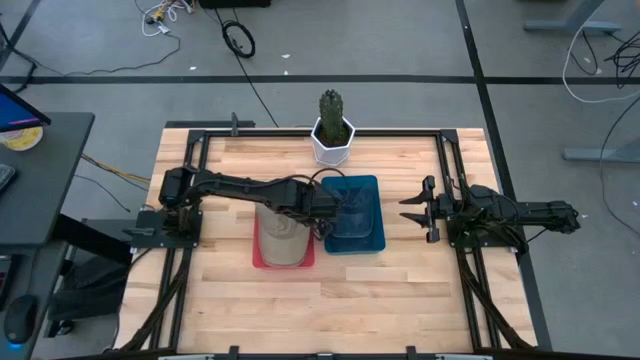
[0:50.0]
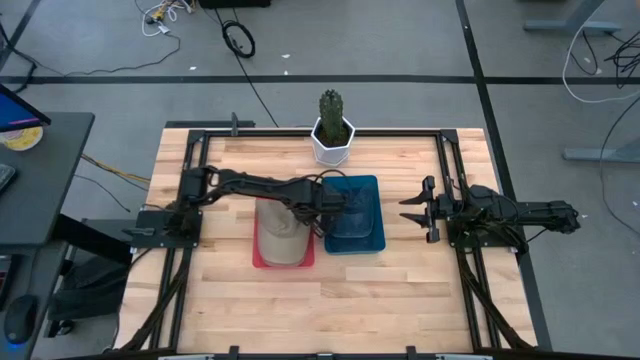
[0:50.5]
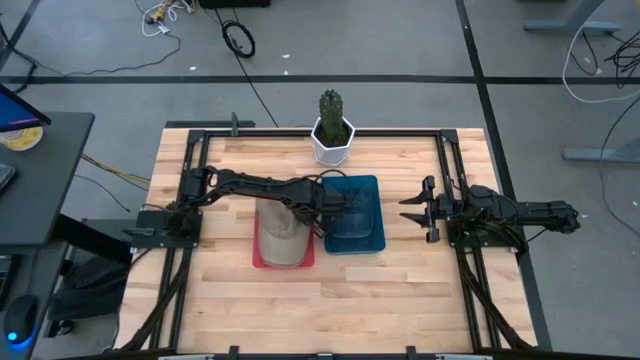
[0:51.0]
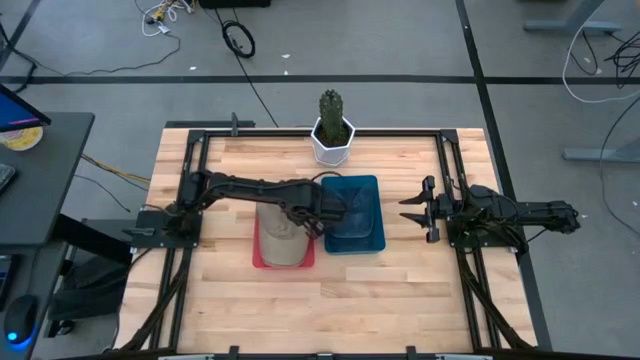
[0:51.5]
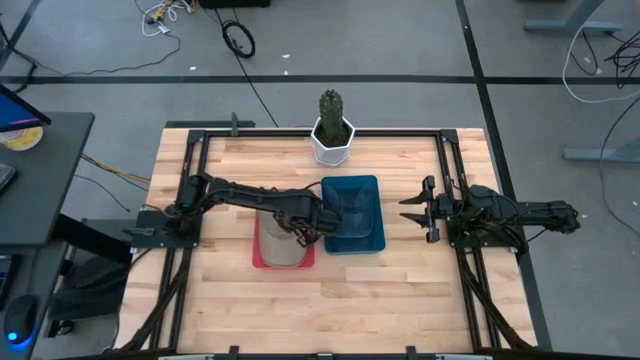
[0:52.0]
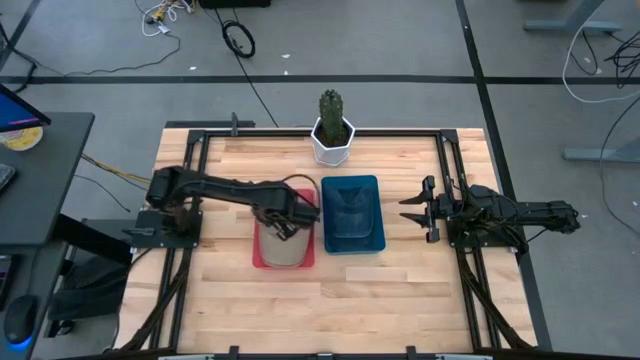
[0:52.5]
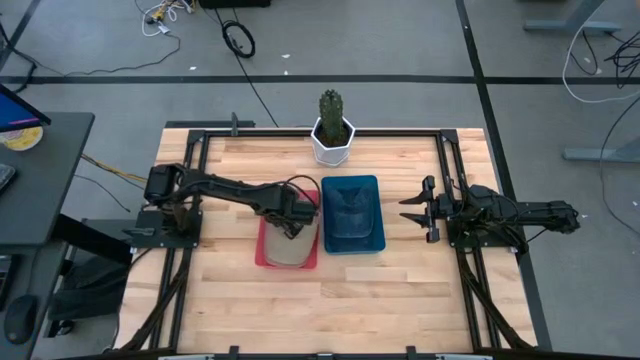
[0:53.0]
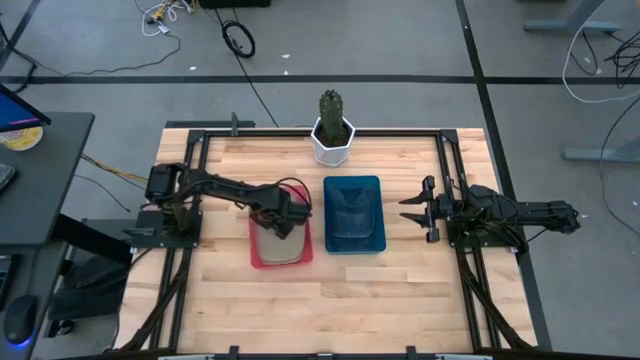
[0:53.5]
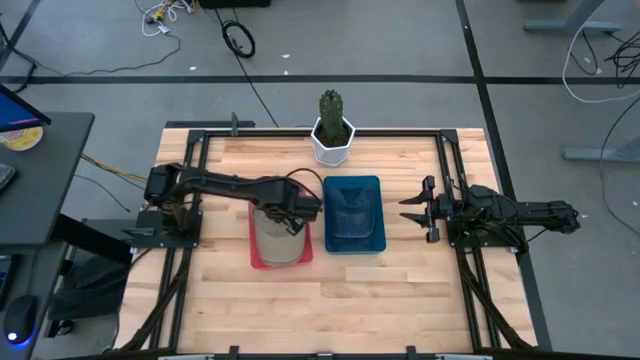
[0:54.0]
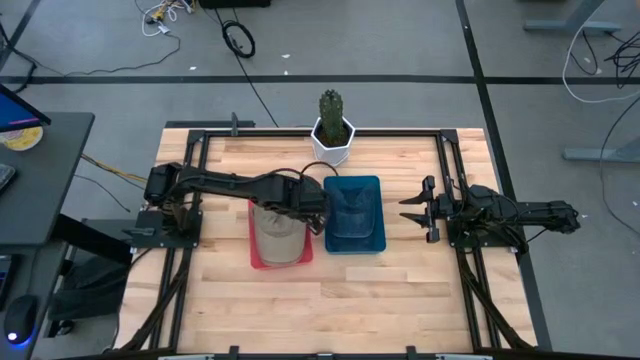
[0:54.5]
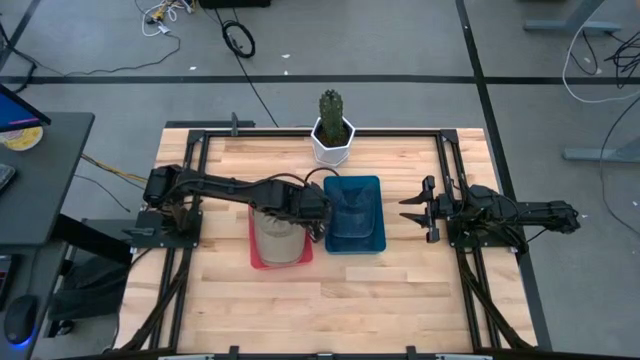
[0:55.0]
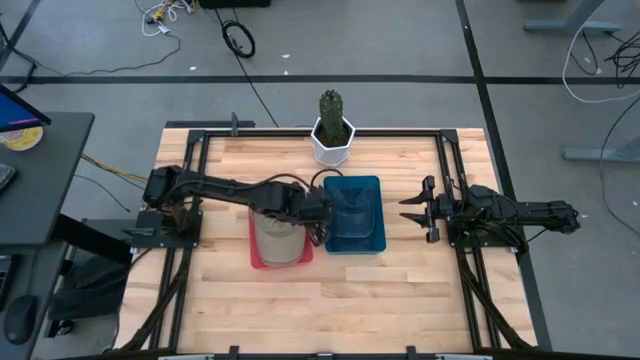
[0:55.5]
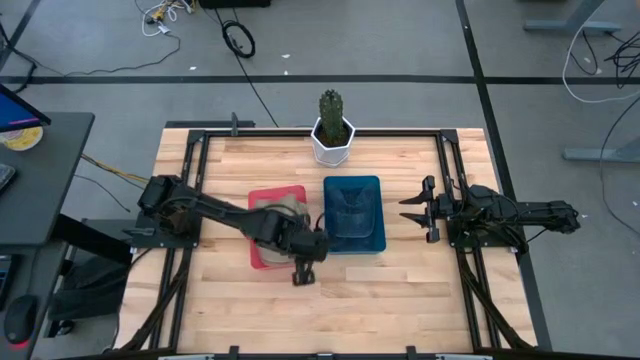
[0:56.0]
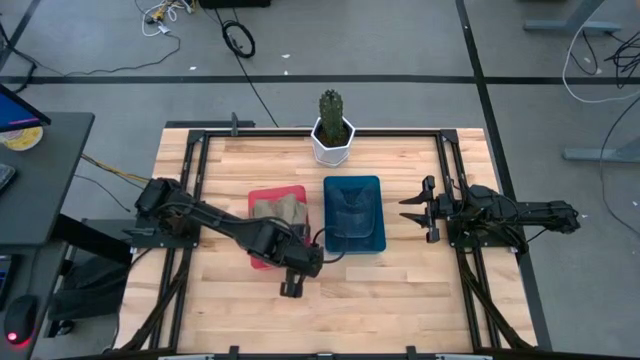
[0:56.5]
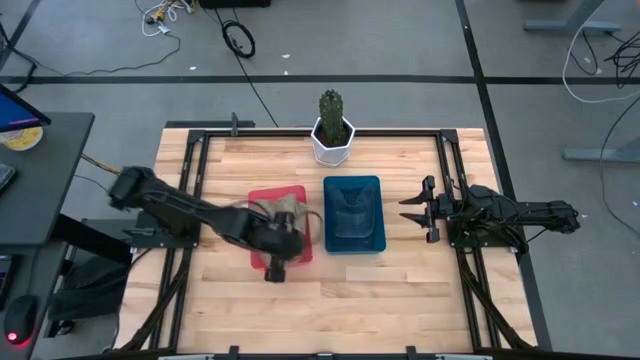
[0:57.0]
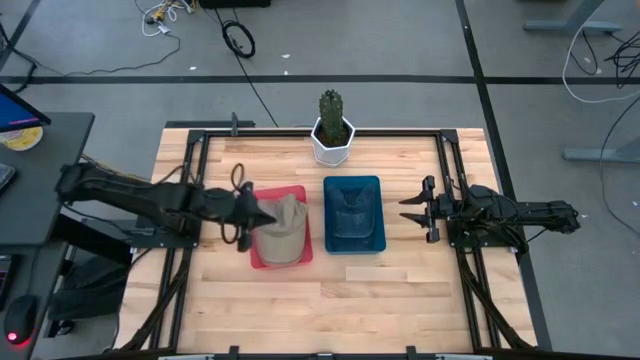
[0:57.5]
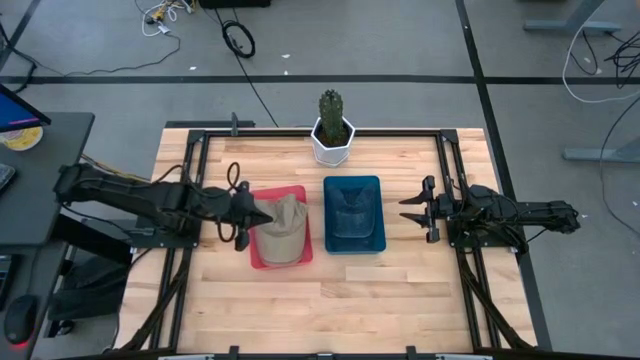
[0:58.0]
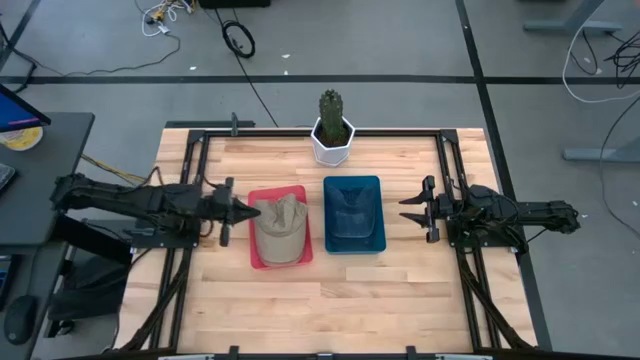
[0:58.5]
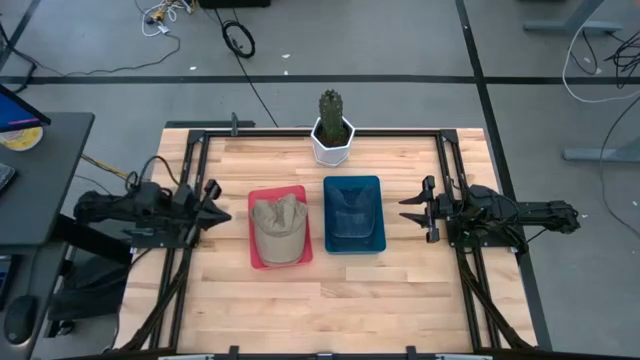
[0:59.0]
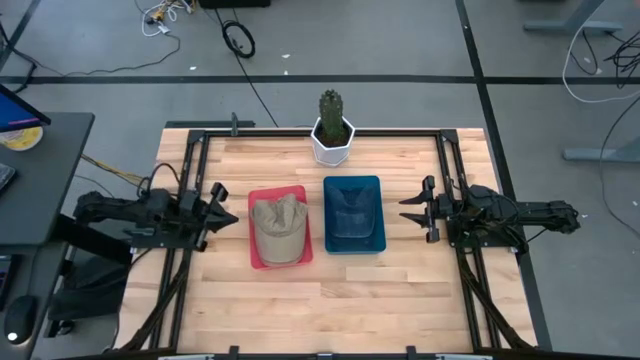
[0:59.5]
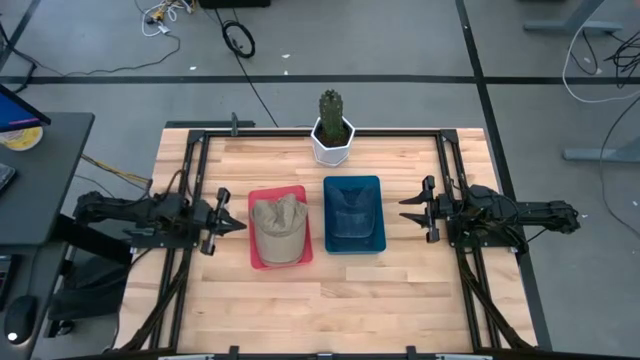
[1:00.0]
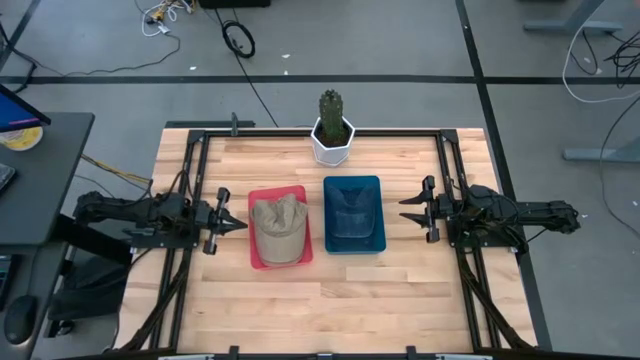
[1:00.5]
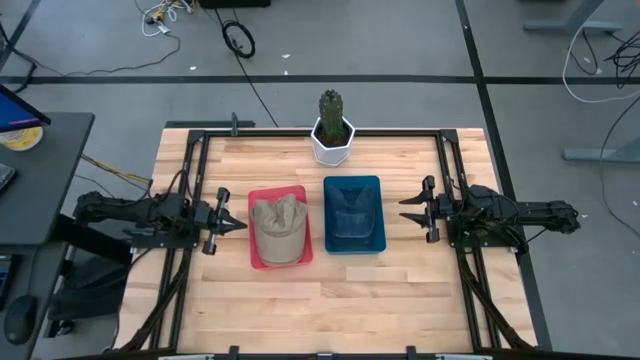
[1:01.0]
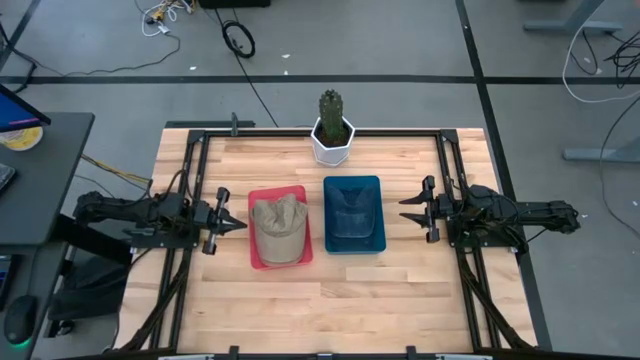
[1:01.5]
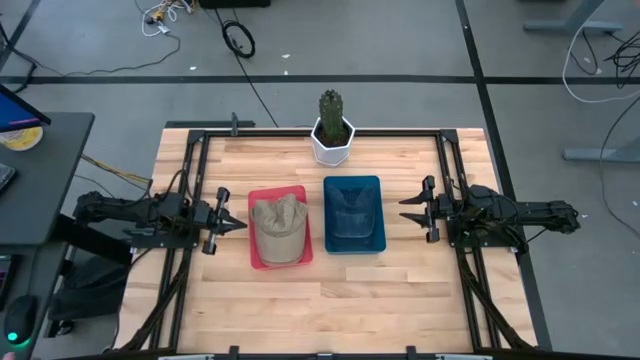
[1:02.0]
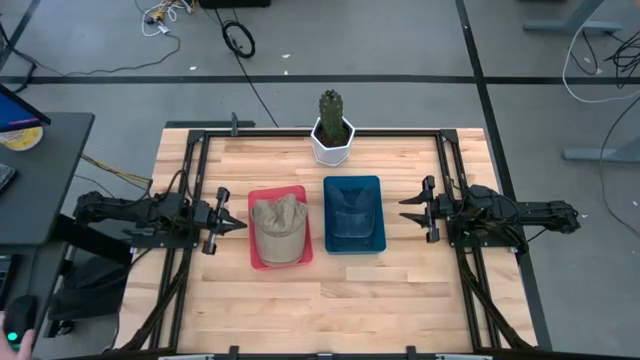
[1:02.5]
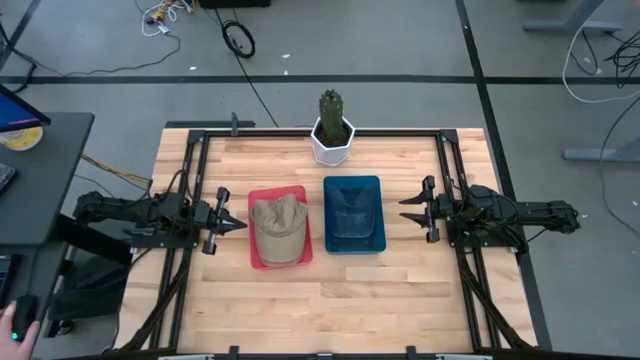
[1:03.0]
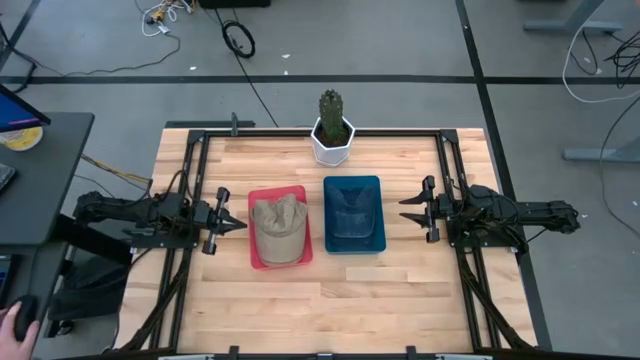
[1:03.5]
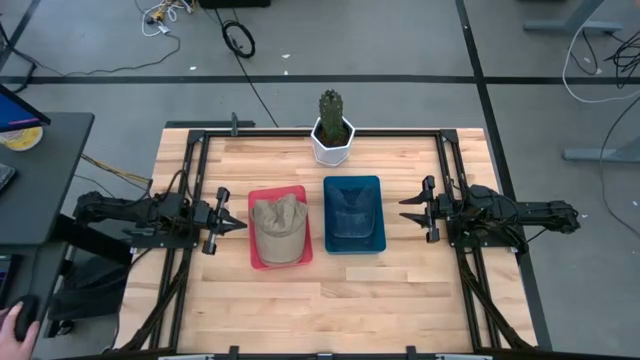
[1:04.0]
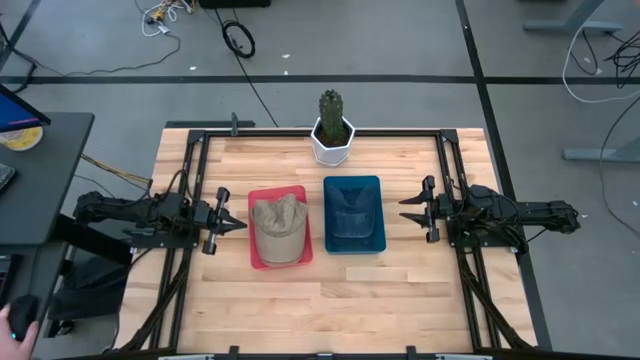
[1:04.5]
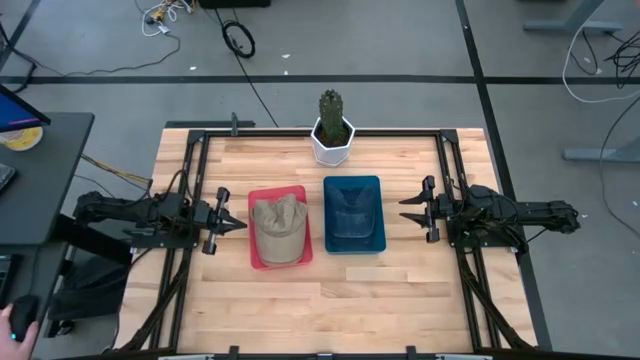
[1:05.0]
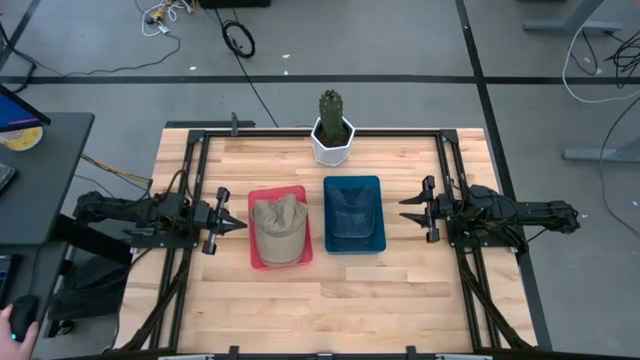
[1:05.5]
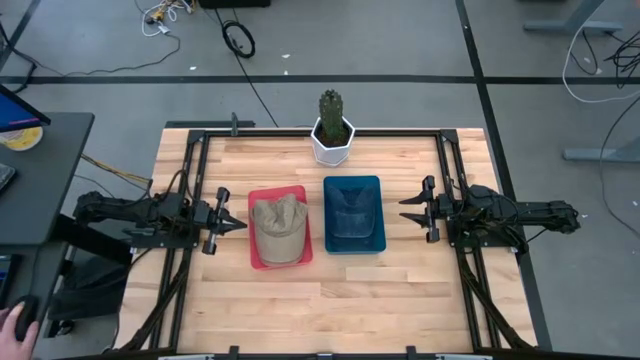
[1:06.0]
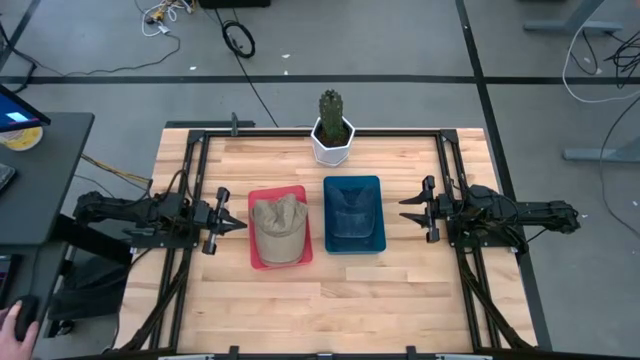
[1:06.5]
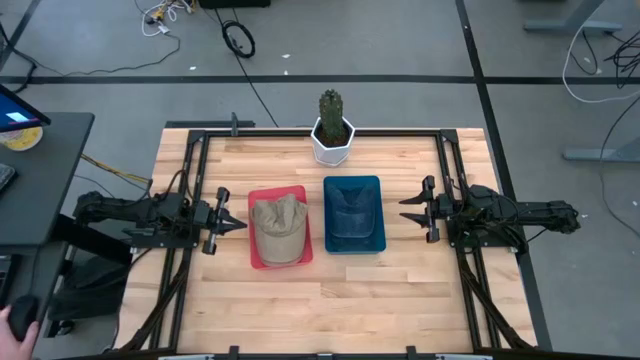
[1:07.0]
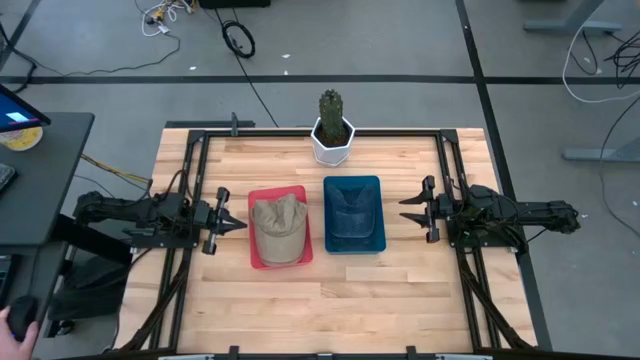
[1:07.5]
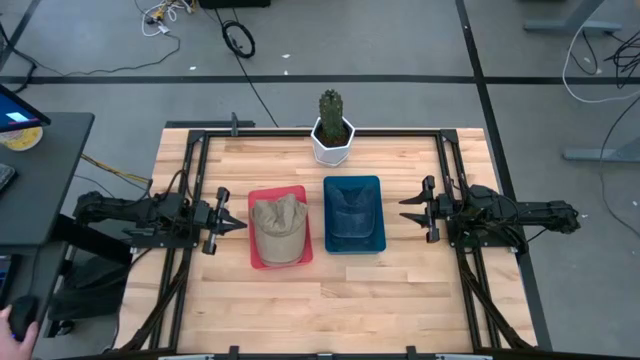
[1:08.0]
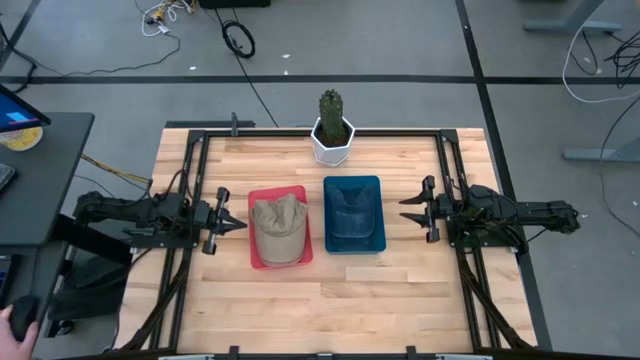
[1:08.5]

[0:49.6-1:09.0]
Task: Pick & Place hat
Return to Home Position

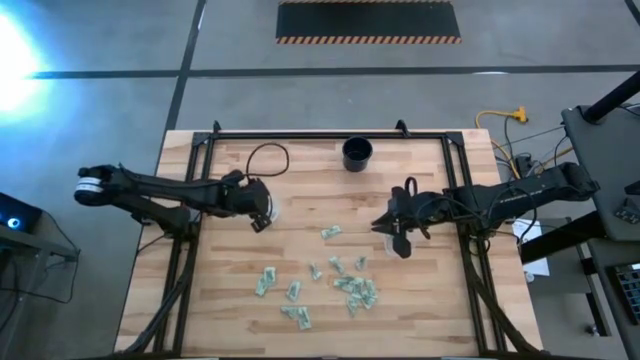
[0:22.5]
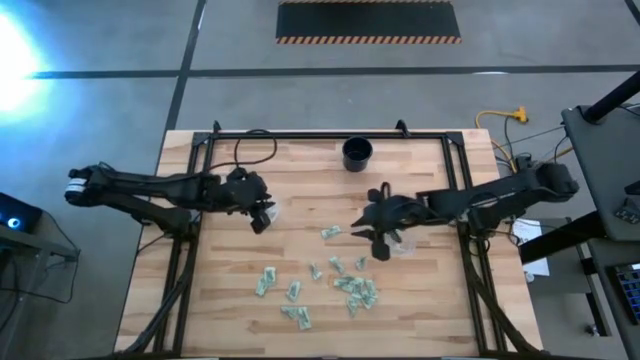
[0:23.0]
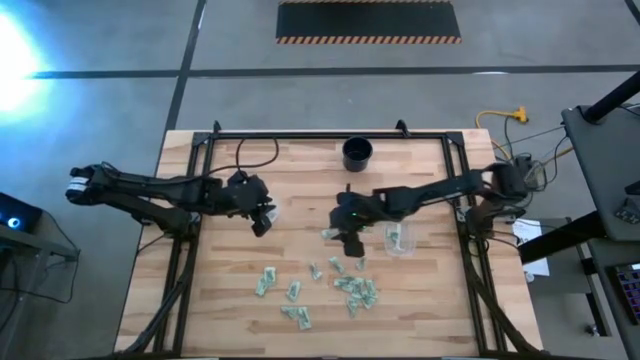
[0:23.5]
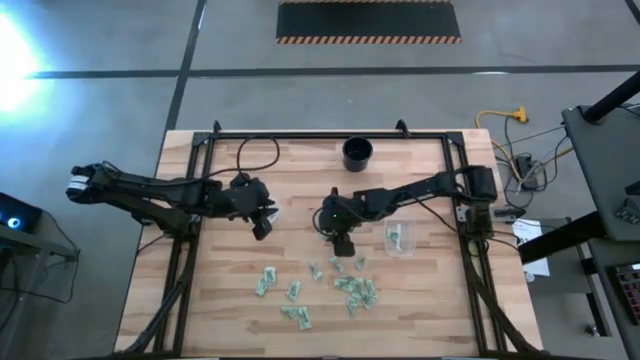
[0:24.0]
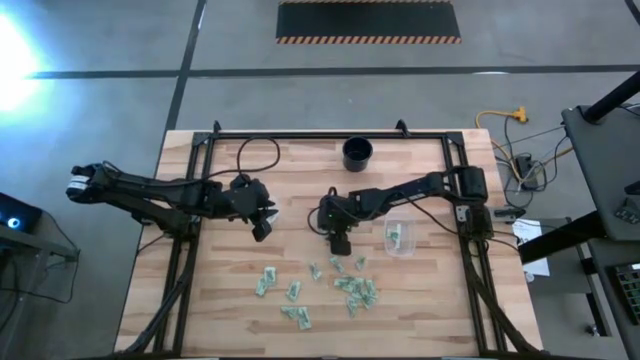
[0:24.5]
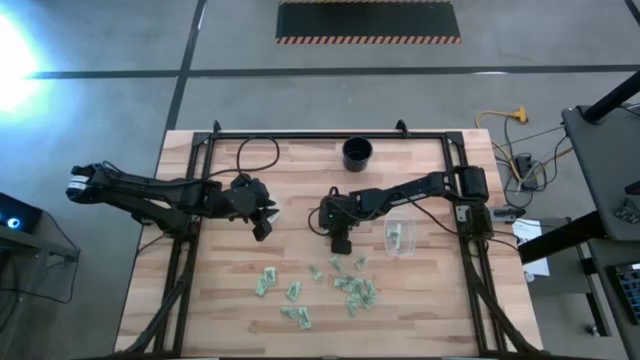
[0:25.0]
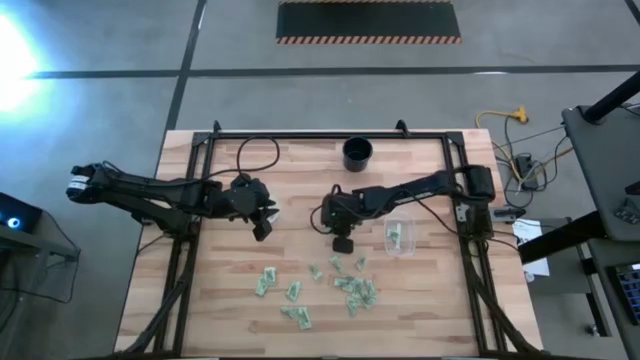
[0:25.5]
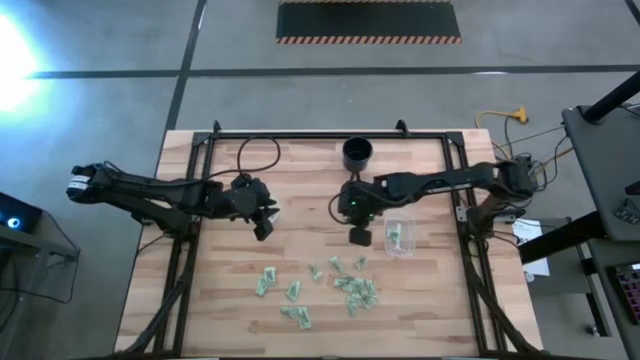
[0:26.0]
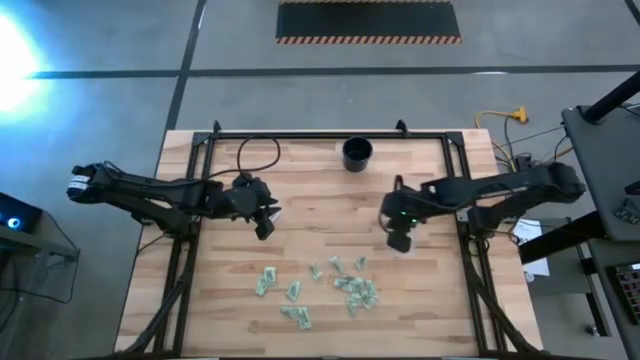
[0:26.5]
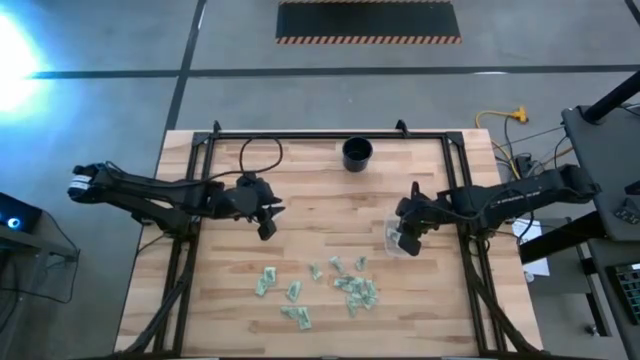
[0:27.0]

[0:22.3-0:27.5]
Task: Pick and place items into bin
Put the white sweetener packet into the right transparent bin
